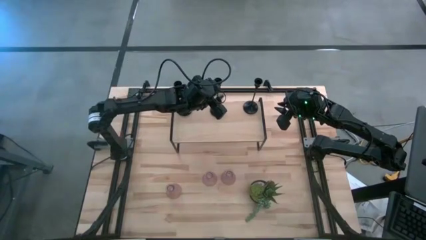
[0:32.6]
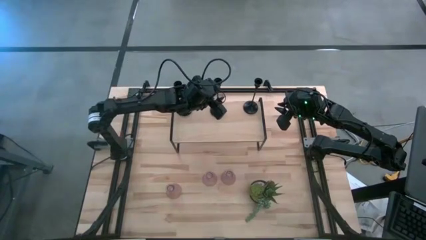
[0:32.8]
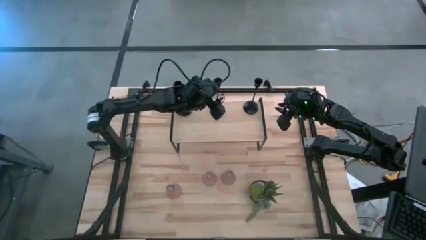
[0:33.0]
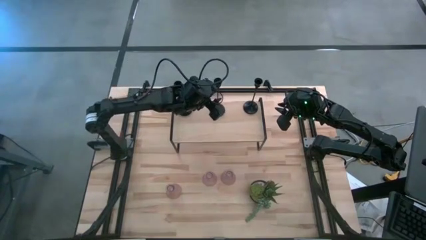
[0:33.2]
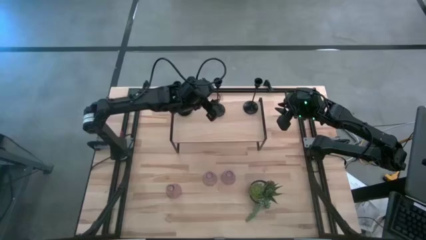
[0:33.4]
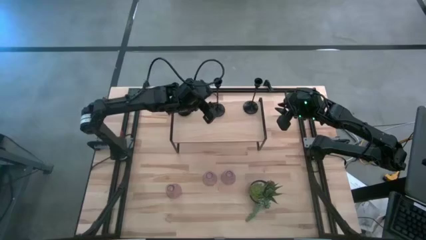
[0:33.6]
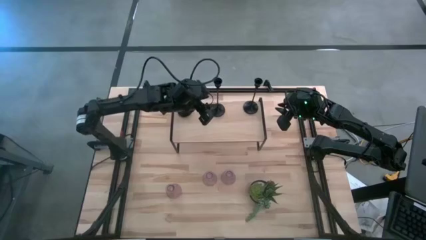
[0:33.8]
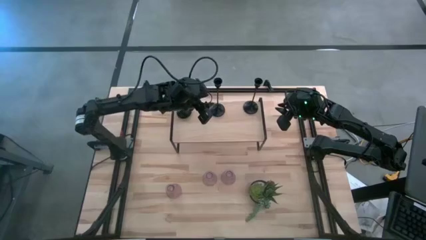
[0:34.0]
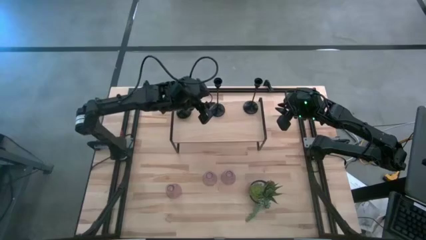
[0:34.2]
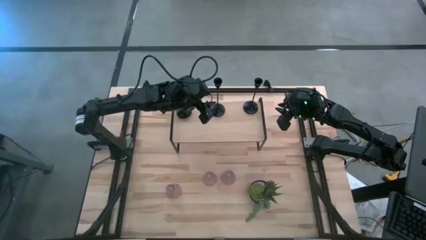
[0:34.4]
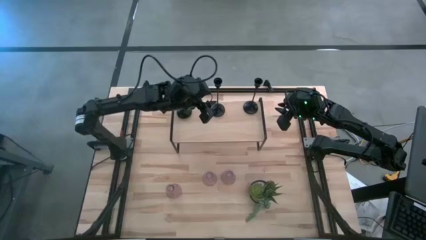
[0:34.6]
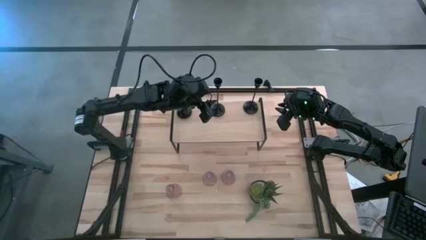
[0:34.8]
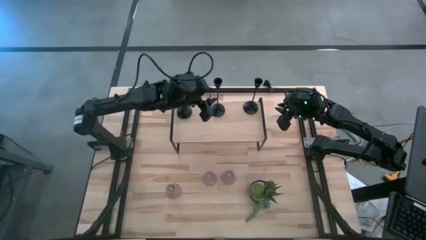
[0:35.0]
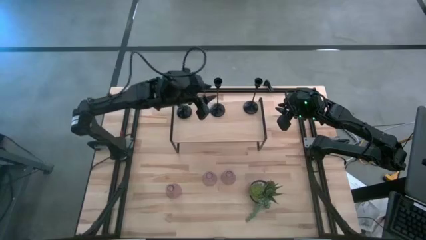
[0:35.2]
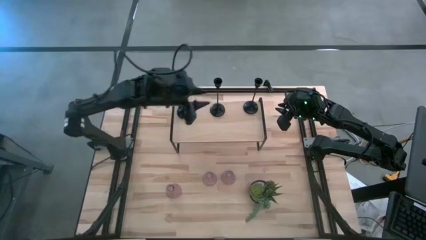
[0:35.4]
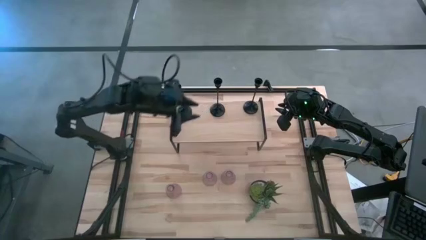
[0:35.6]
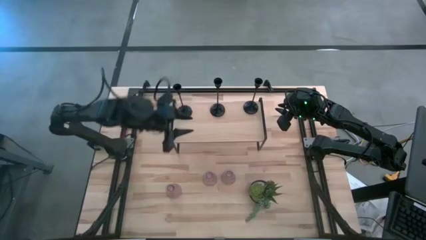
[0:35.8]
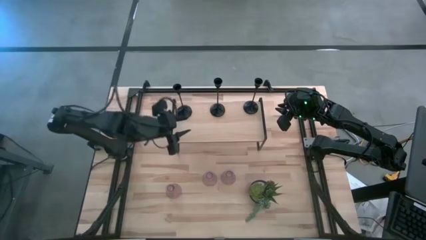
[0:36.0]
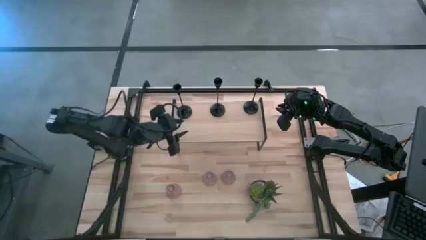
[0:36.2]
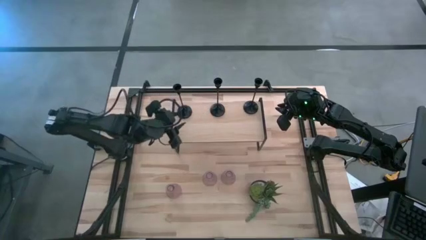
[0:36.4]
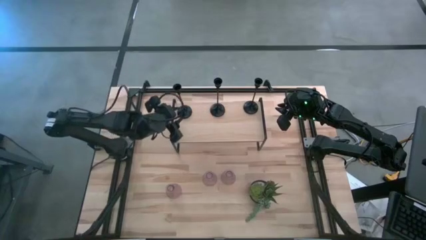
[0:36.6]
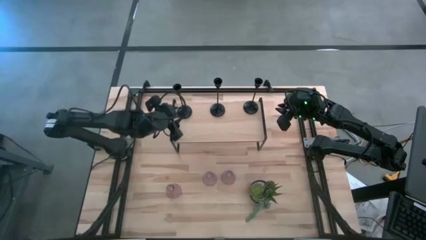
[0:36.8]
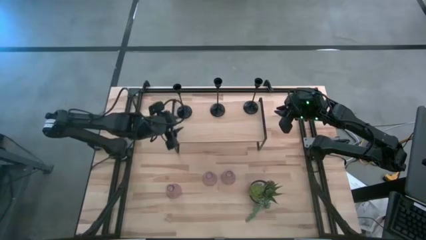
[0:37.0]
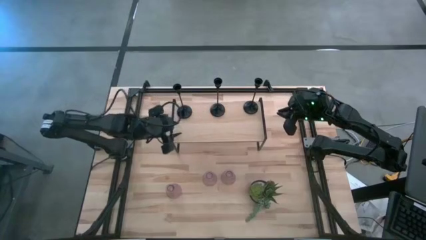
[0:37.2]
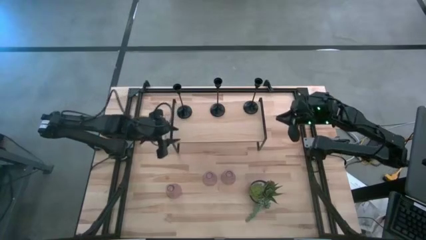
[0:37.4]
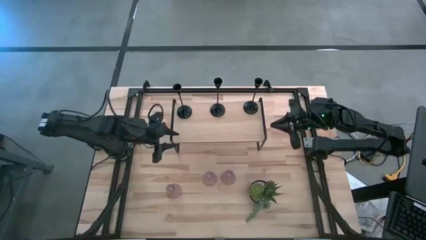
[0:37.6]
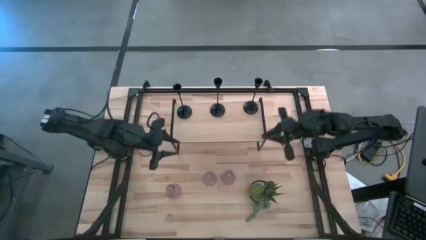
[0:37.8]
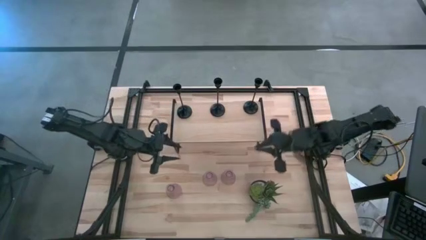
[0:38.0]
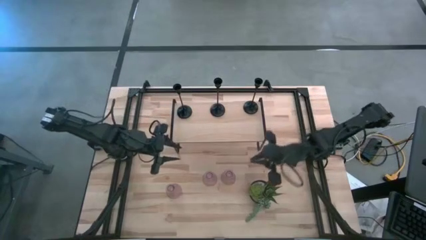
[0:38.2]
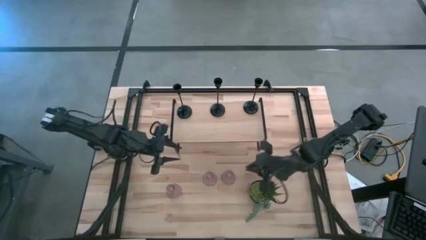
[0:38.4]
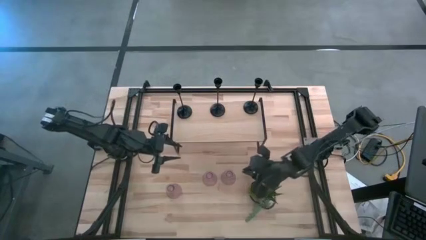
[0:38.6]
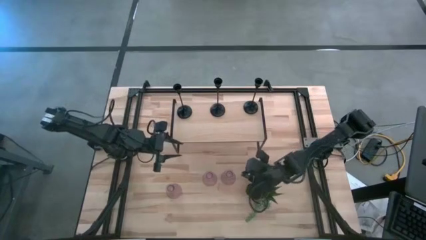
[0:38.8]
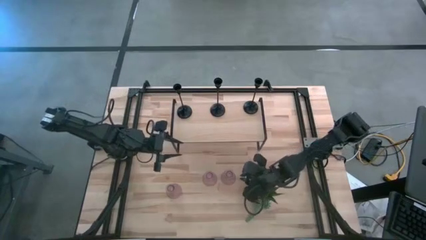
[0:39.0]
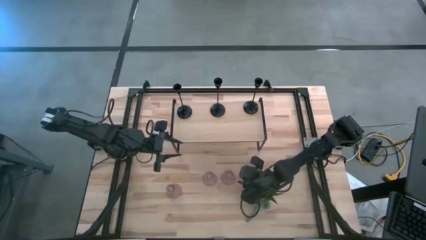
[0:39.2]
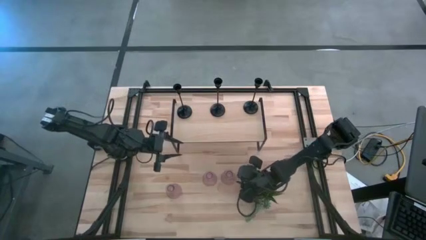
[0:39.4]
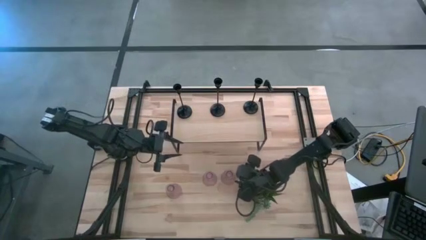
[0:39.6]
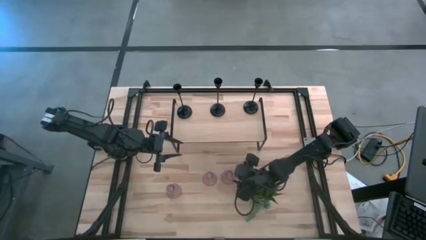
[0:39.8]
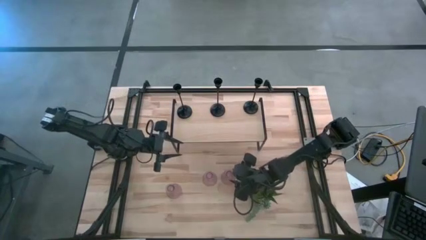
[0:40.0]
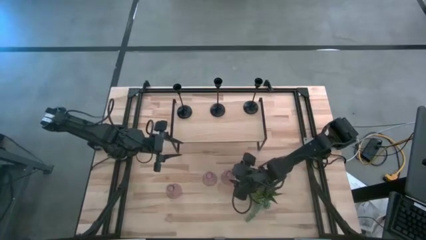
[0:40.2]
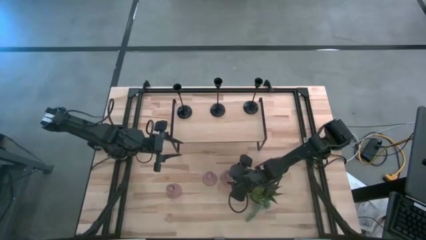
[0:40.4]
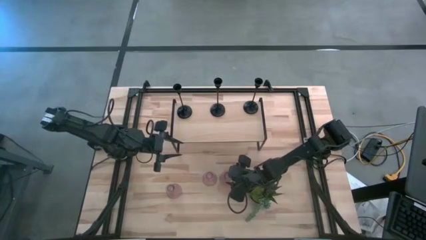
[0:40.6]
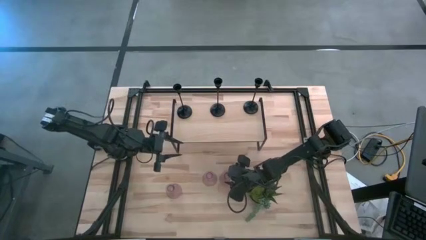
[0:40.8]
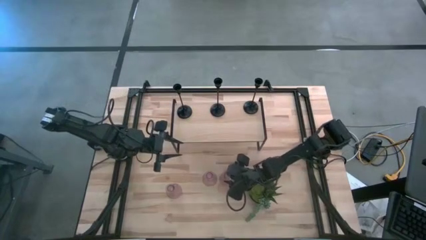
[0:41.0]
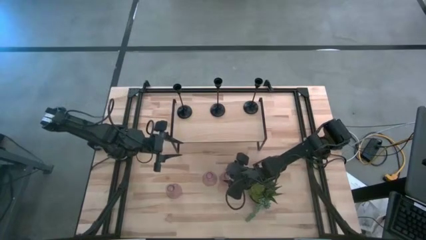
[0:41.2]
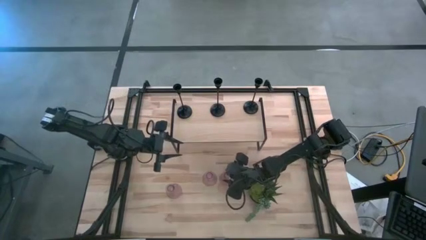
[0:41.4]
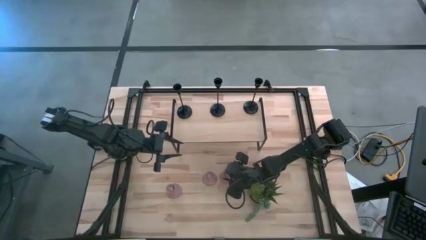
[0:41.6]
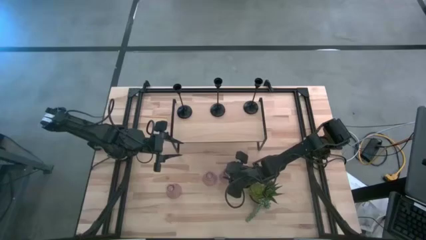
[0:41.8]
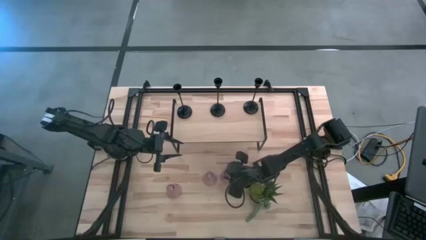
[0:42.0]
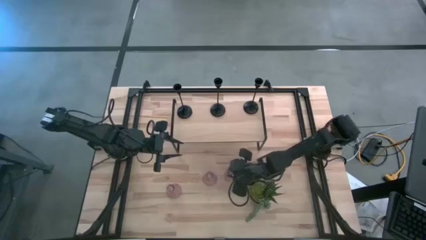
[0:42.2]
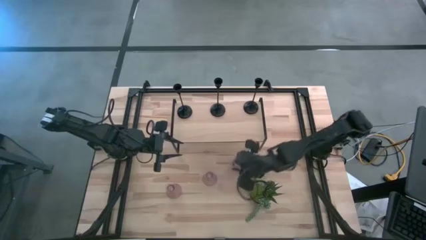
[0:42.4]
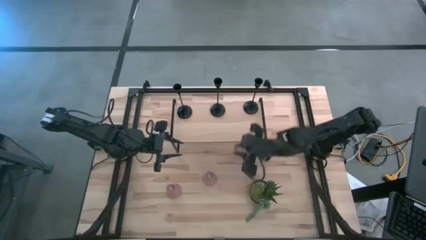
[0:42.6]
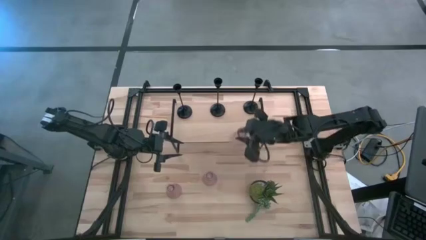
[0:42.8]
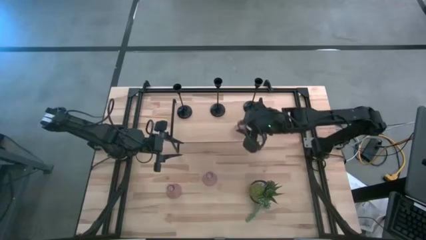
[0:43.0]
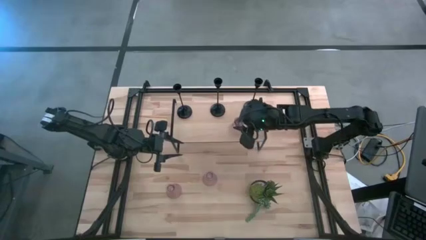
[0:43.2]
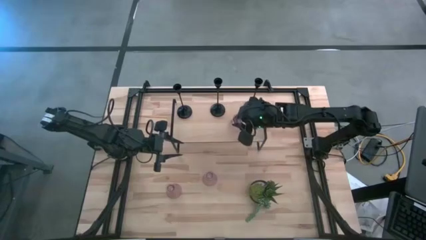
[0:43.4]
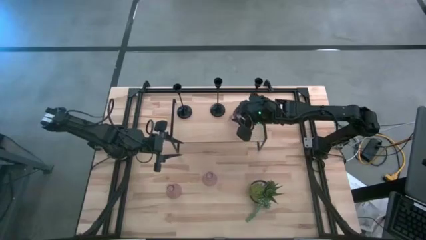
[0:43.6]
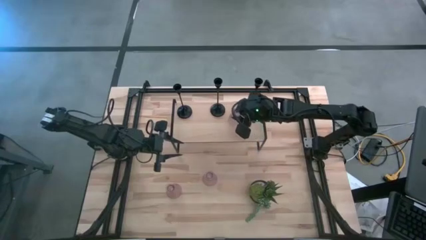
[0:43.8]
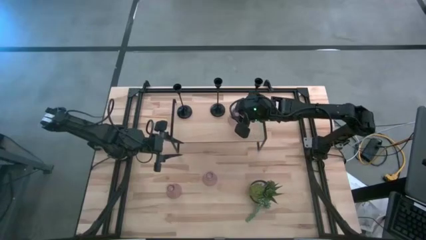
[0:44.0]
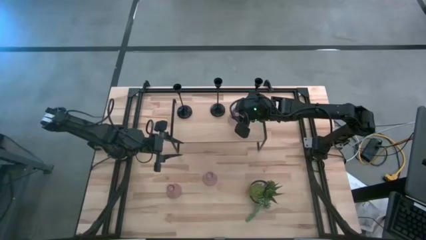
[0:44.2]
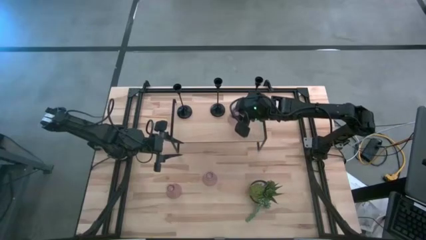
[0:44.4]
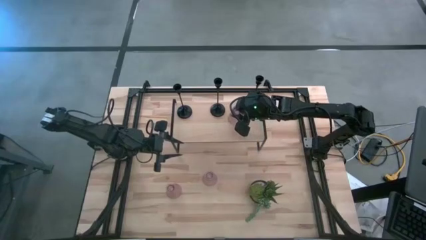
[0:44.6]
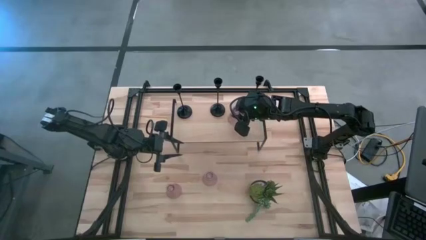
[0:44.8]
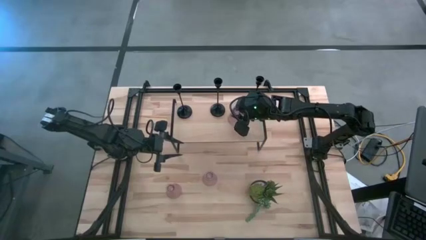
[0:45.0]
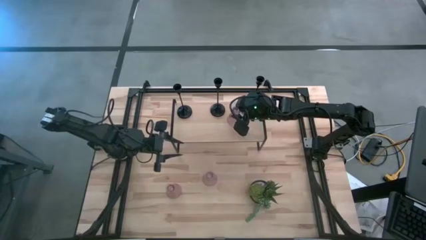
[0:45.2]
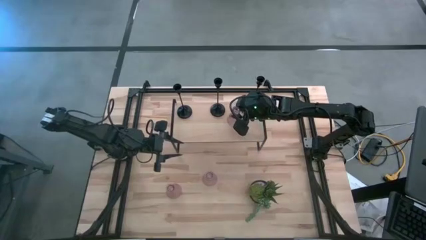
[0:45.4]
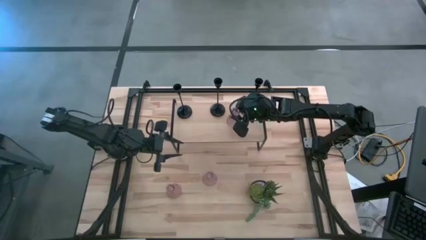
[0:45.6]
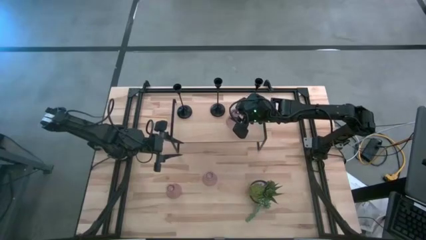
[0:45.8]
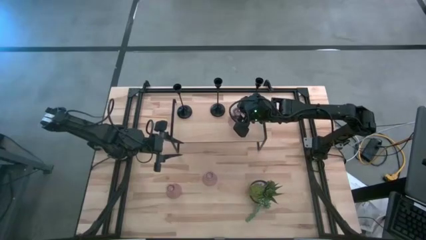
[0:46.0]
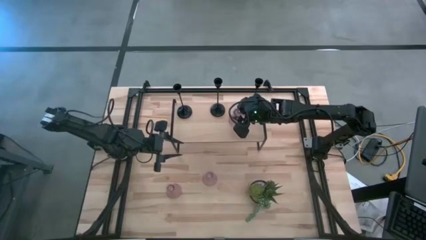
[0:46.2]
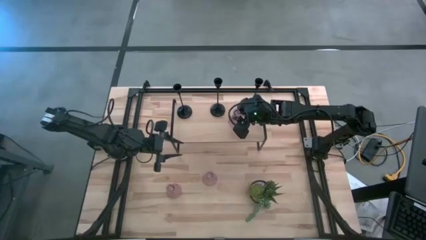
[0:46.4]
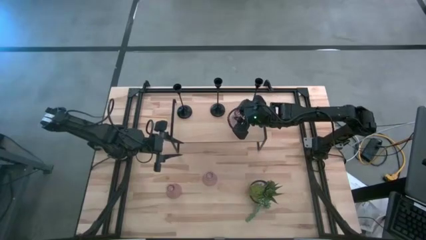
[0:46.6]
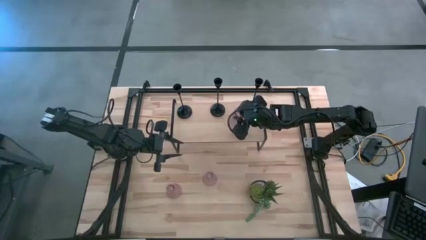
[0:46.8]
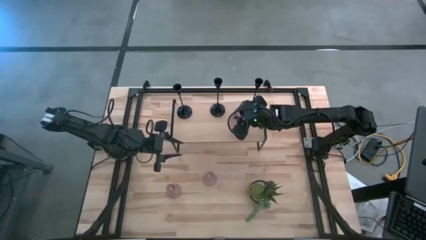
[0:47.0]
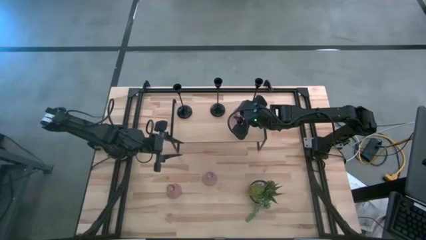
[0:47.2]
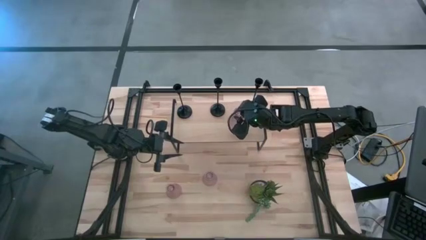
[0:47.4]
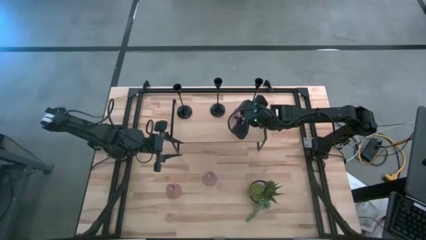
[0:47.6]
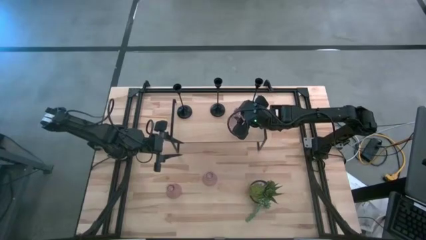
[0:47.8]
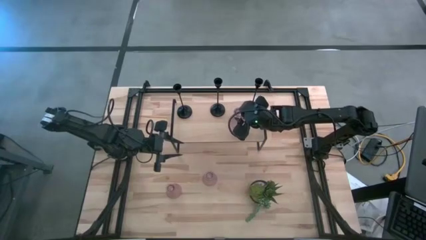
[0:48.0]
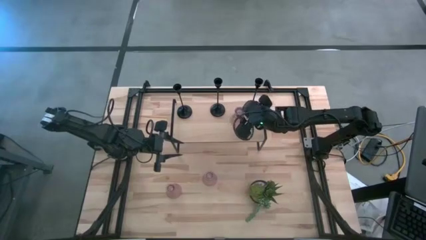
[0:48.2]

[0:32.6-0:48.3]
Task: Pick & Place candle stick holders
Put the right pink glass candle holder on the shelf

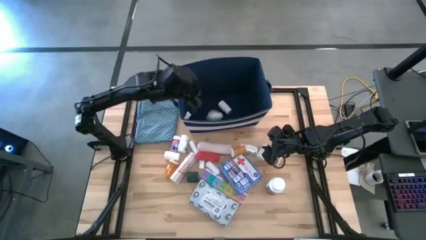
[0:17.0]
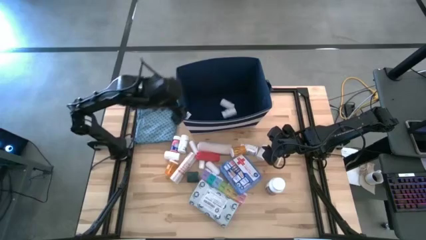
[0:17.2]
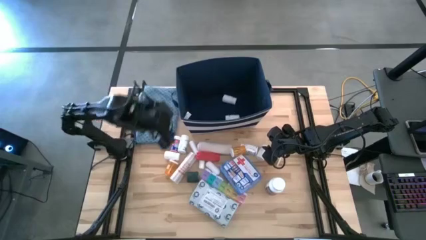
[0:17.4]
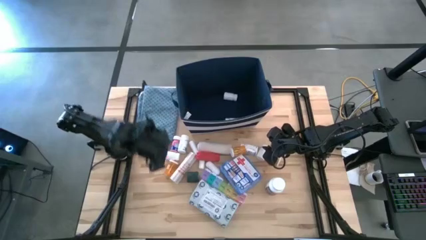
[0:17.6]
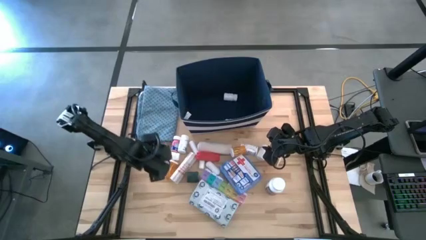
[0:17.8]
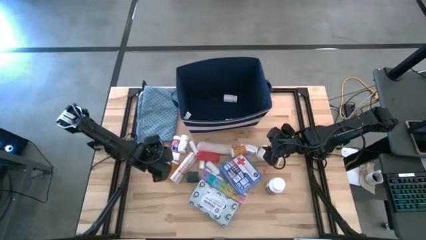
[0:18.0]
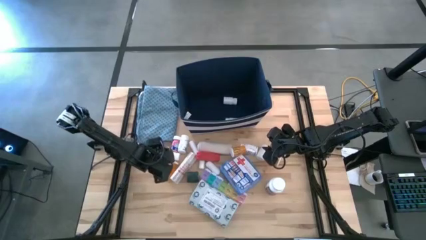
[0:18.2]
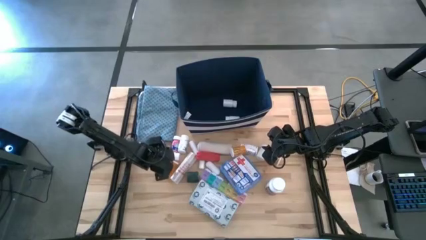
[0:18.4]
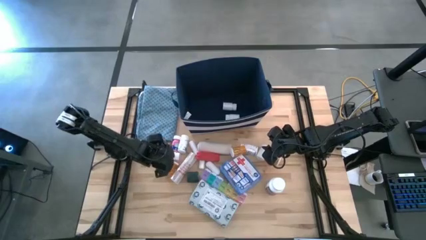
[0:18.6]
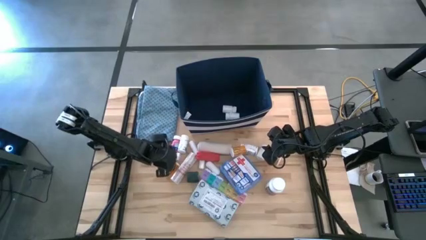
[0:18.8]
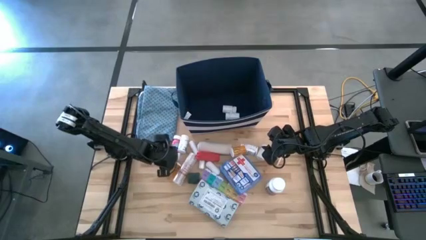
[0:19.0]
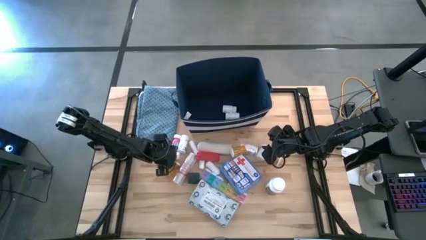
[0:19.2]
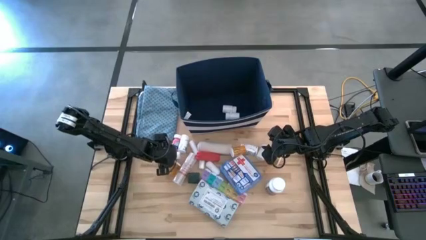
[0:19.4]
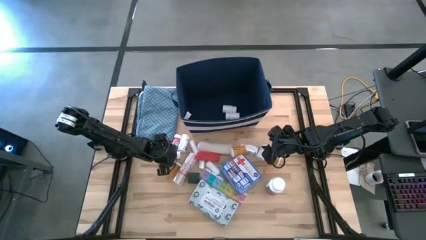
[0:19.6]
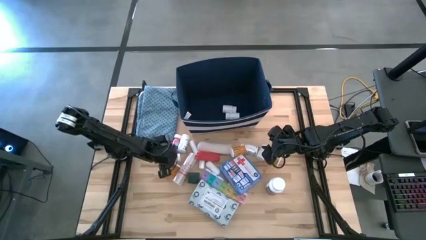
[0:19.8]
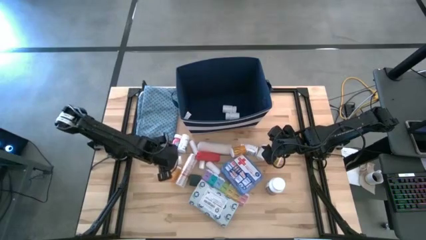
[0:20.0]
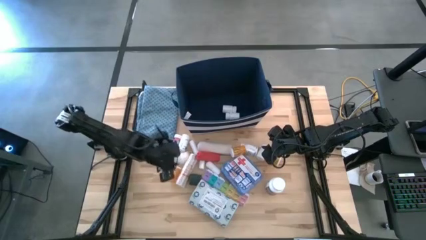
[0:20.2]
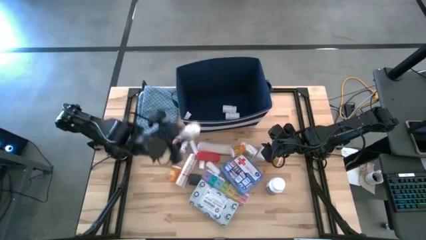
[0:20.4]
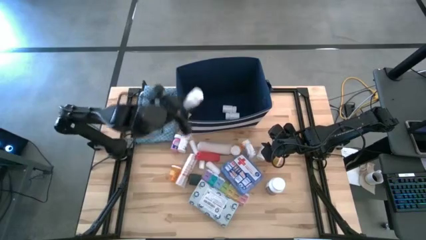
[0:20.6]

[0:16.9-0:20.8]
Task: Pick & place medical supplies in basket/bin
Put the white pill bottle into the blue bin
